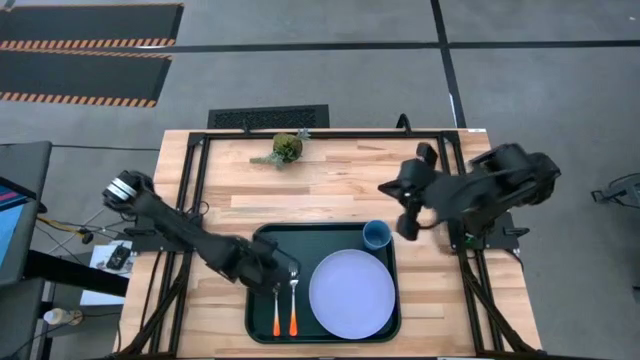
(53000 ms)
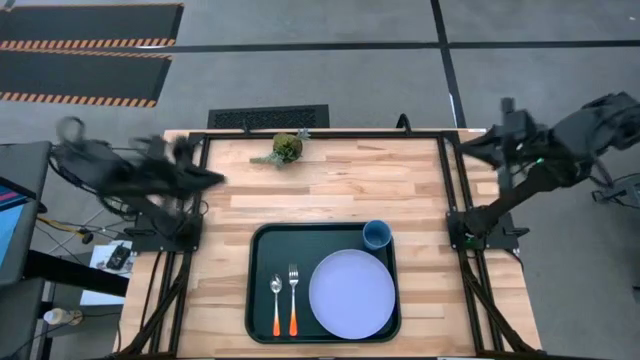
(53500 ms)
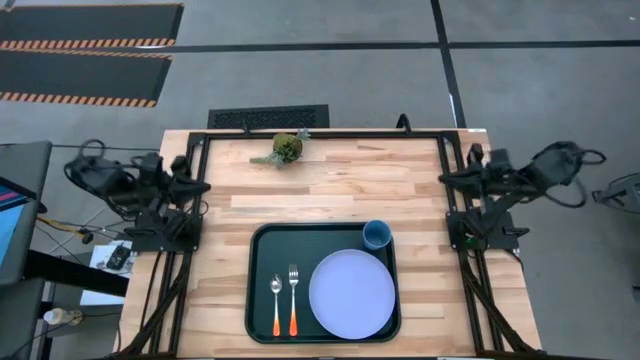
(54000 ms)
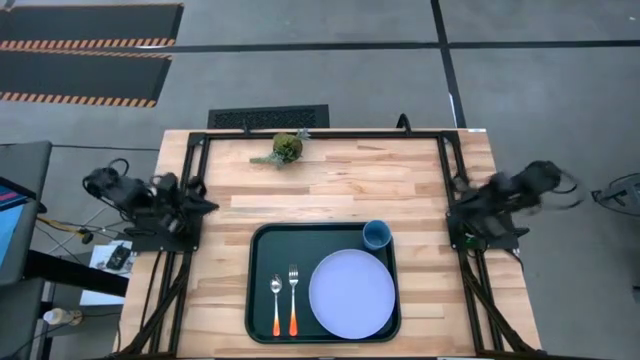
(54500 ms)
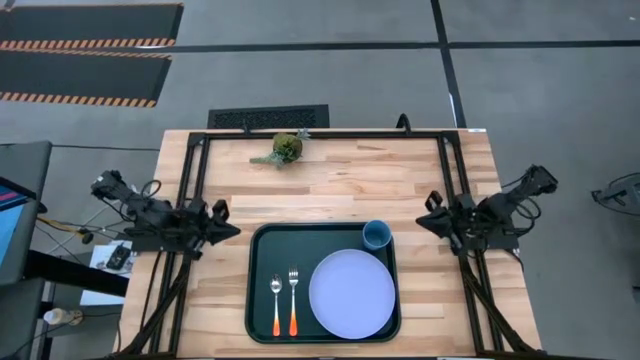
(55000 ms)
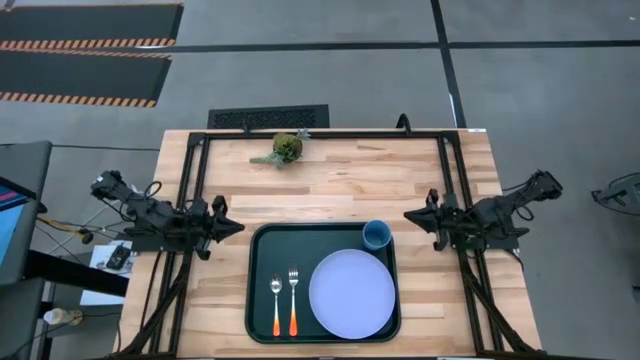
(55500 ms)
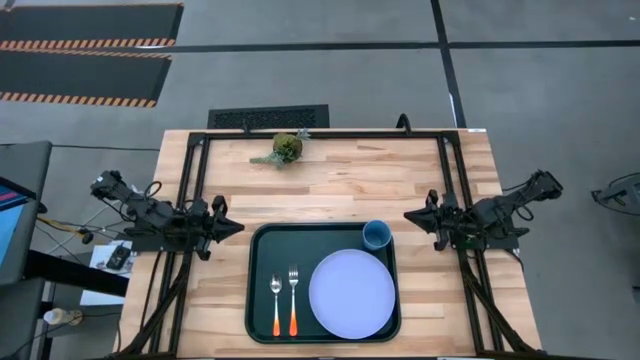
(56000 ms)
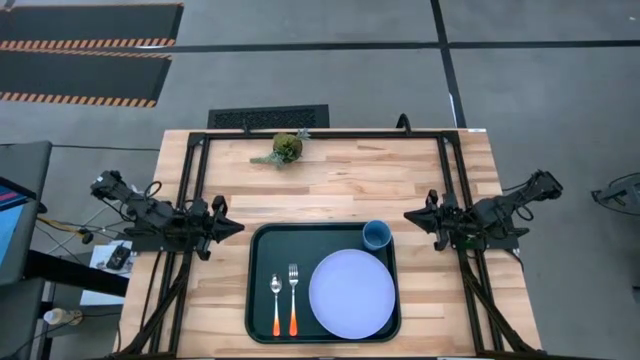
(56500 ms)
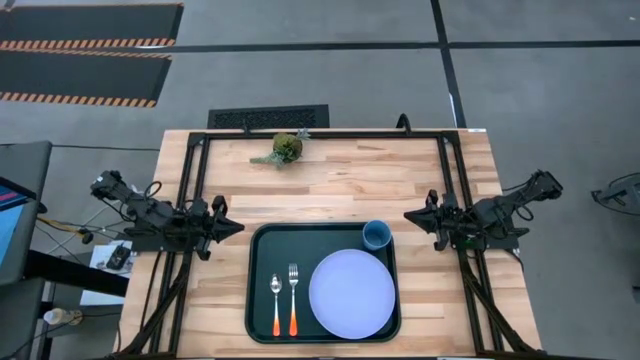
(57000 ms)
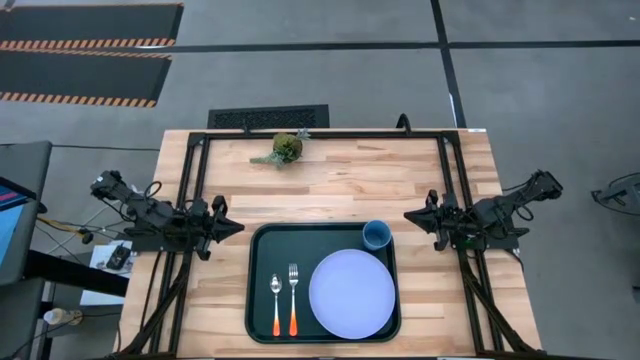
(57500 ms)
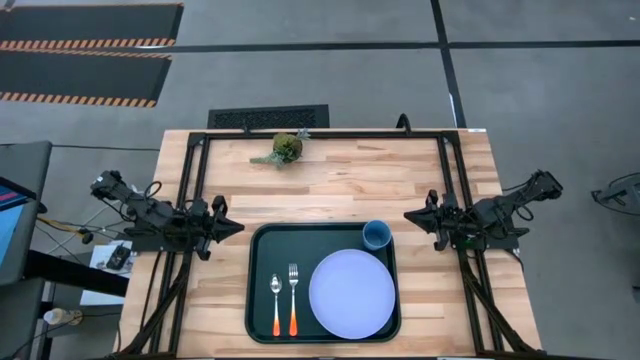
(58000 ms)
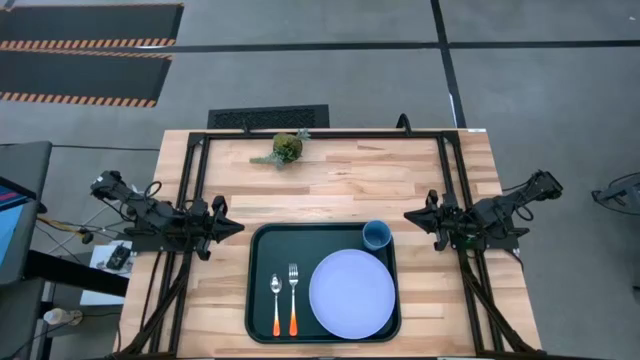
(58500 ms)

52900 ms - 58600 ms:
Task: Pick and place plate/cup/fork/spoon on tray
Return to Home Position

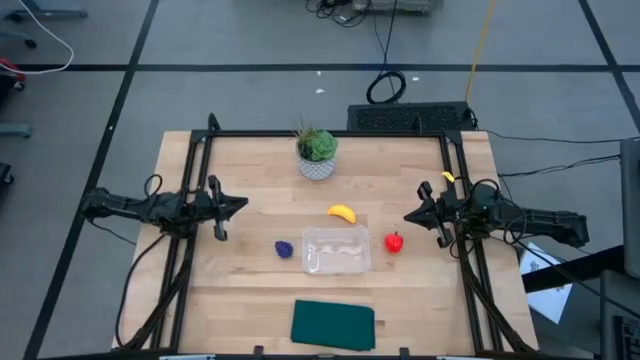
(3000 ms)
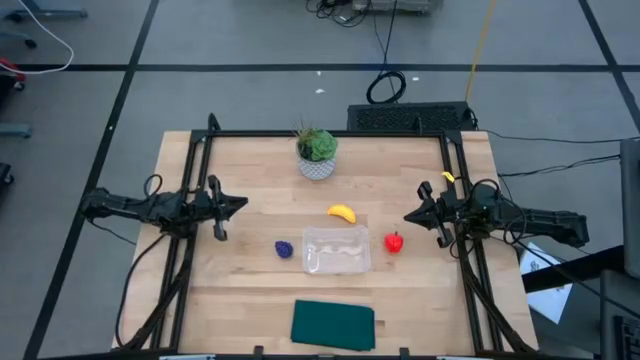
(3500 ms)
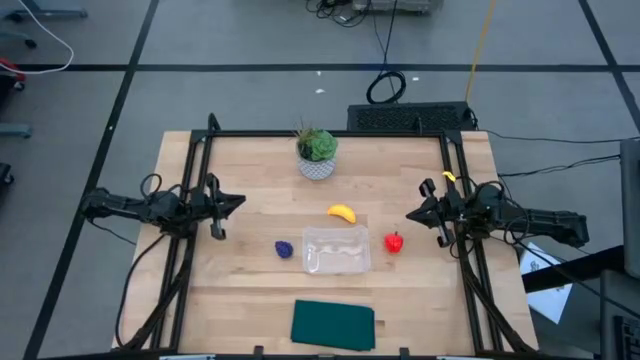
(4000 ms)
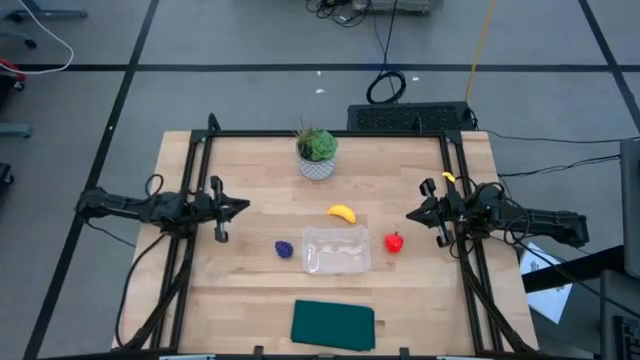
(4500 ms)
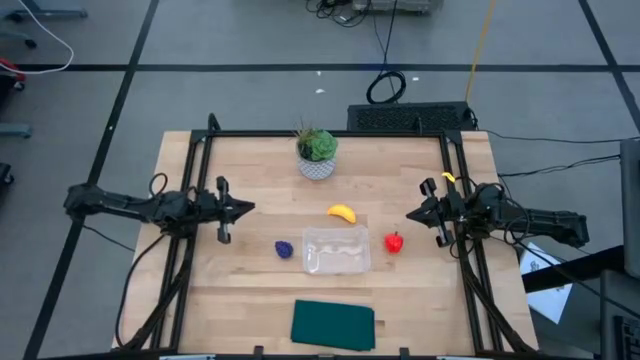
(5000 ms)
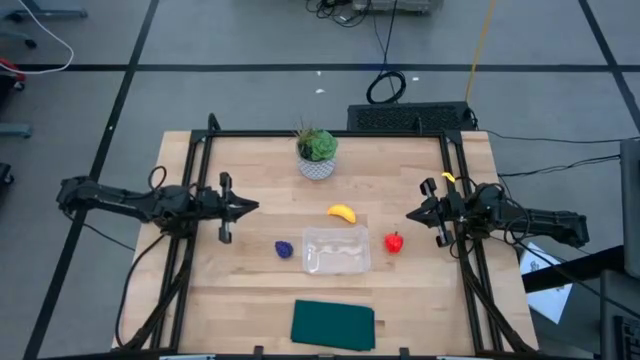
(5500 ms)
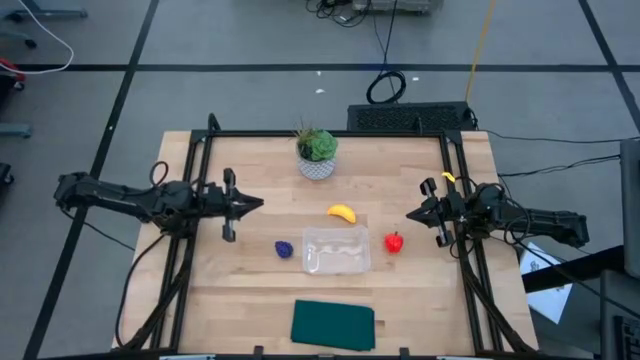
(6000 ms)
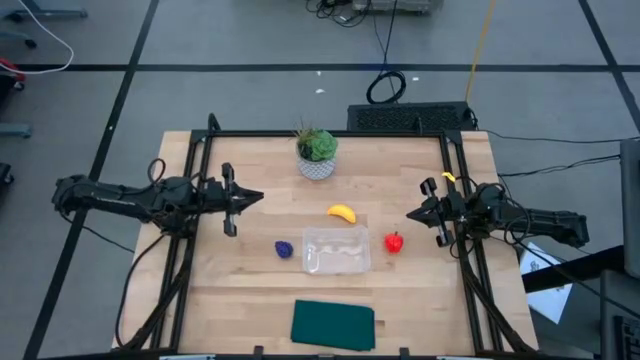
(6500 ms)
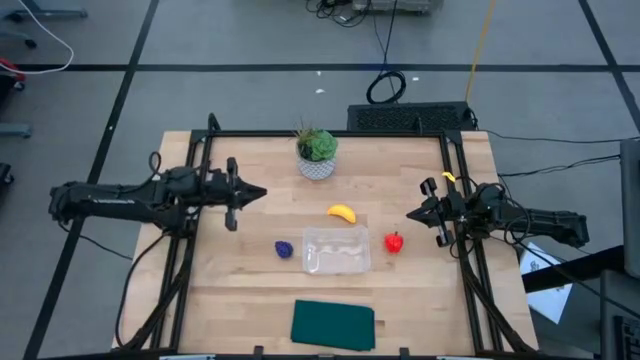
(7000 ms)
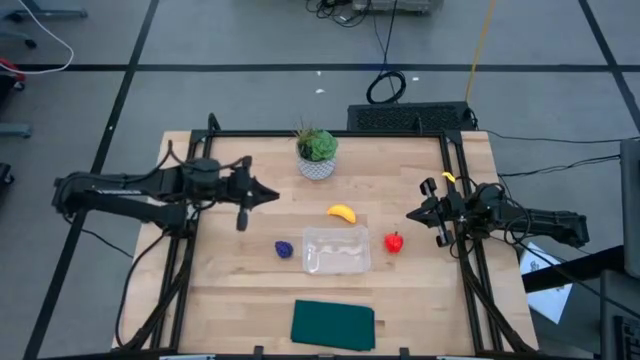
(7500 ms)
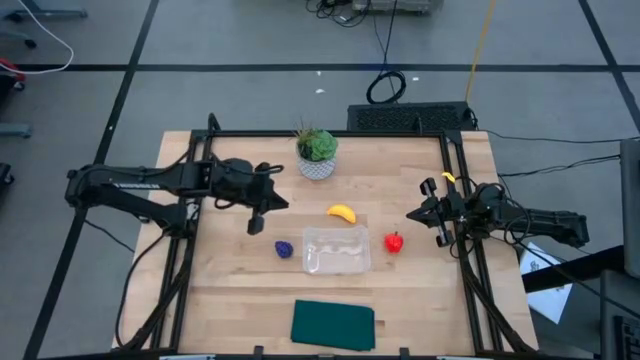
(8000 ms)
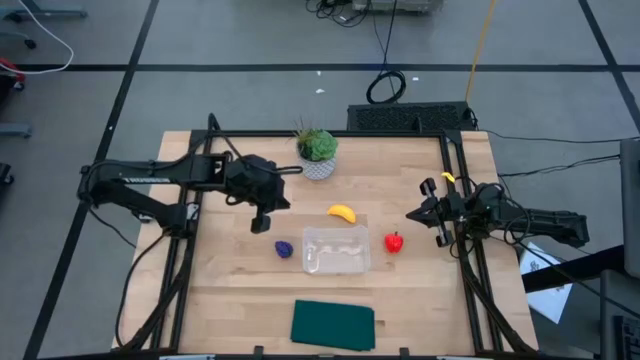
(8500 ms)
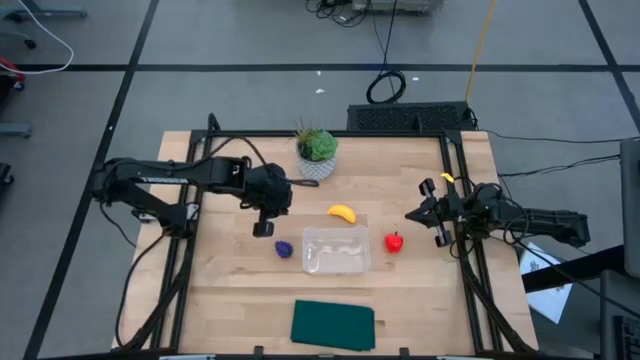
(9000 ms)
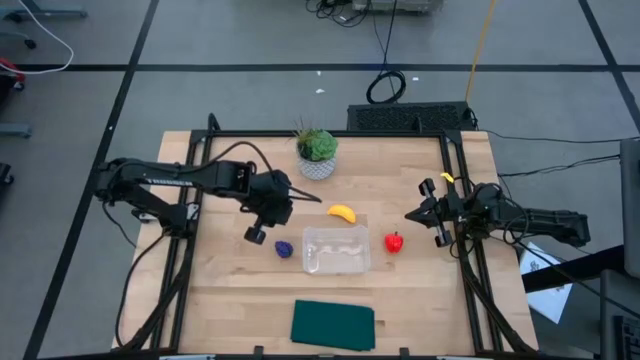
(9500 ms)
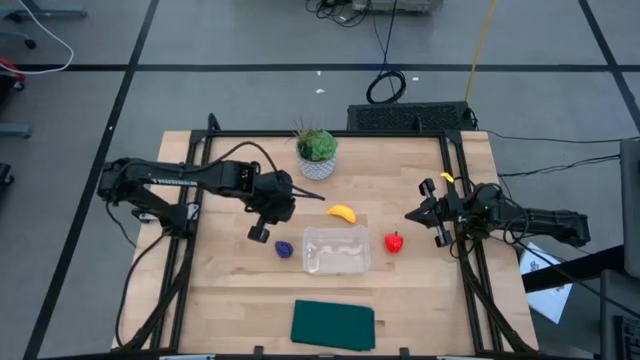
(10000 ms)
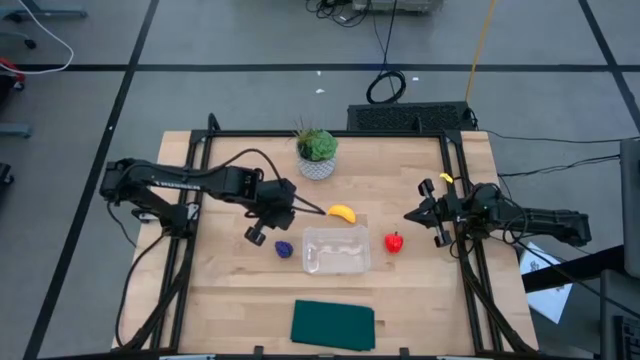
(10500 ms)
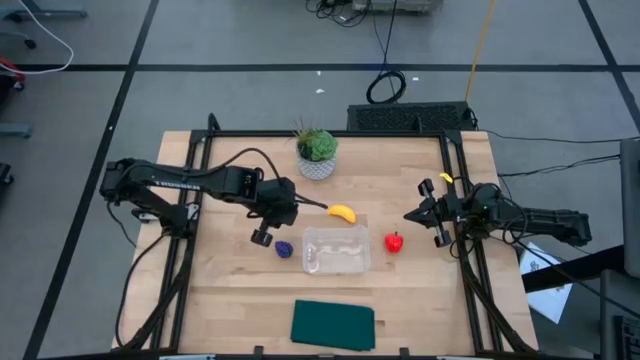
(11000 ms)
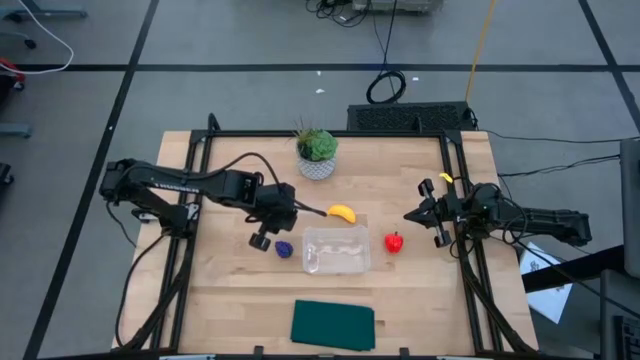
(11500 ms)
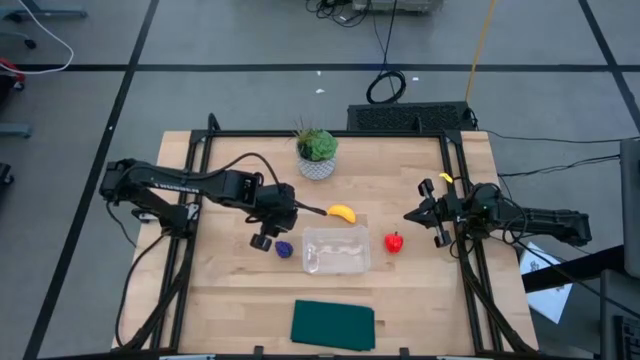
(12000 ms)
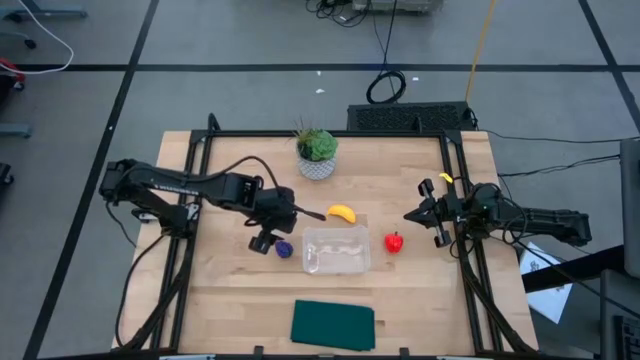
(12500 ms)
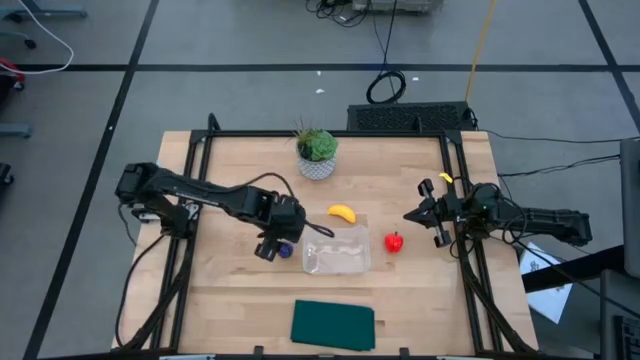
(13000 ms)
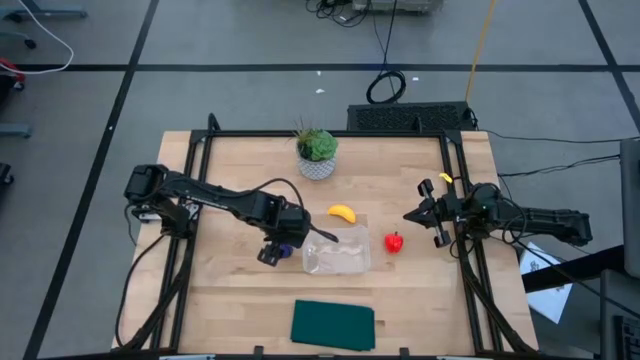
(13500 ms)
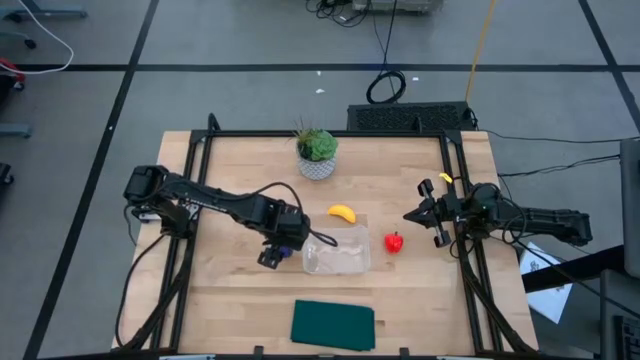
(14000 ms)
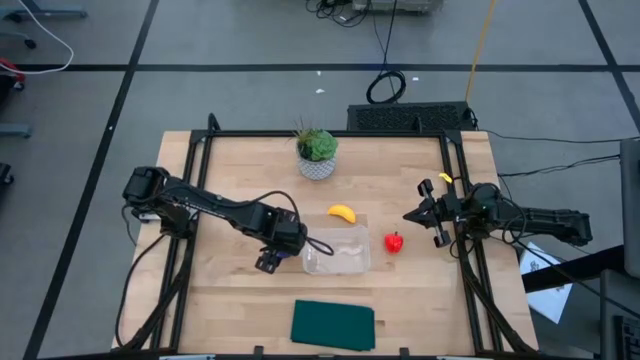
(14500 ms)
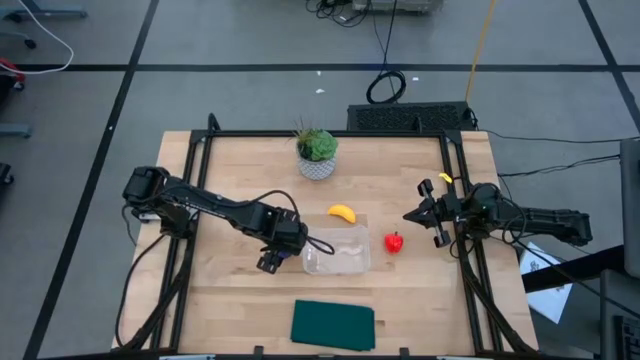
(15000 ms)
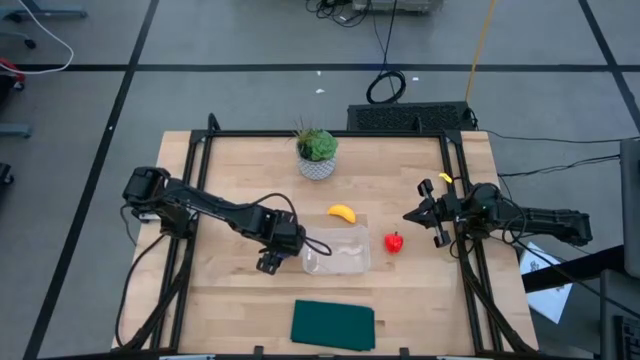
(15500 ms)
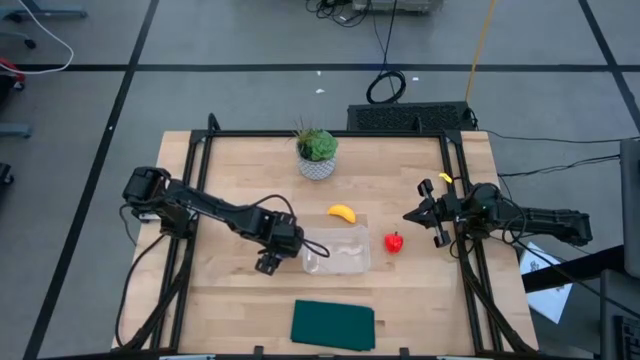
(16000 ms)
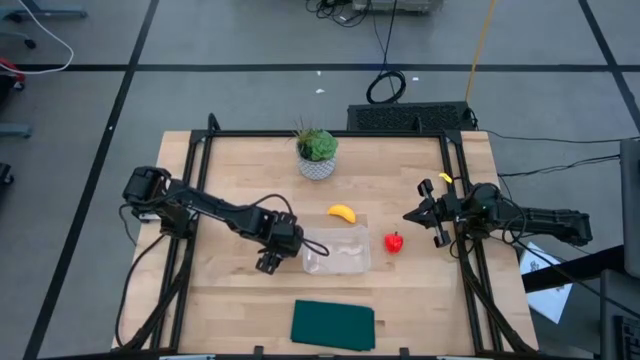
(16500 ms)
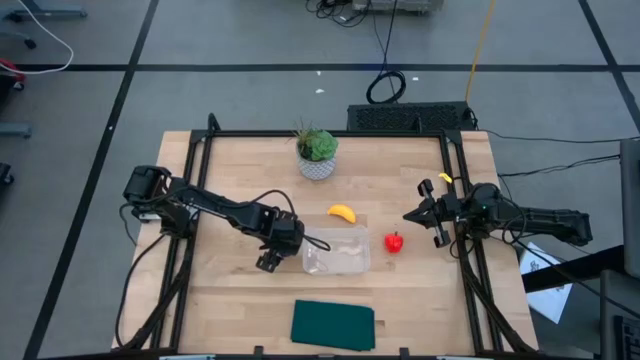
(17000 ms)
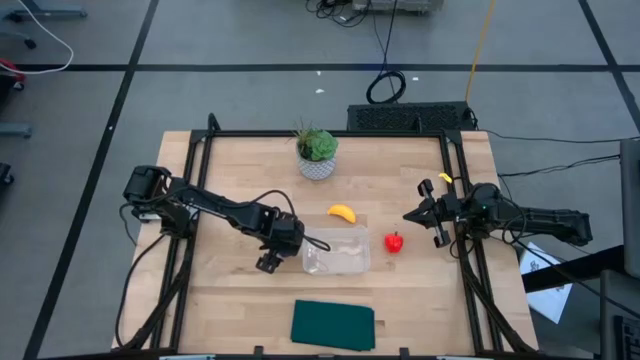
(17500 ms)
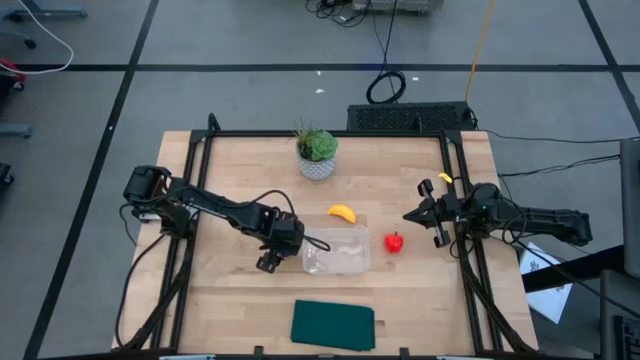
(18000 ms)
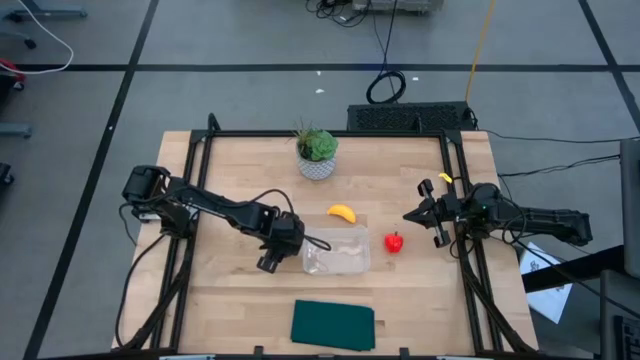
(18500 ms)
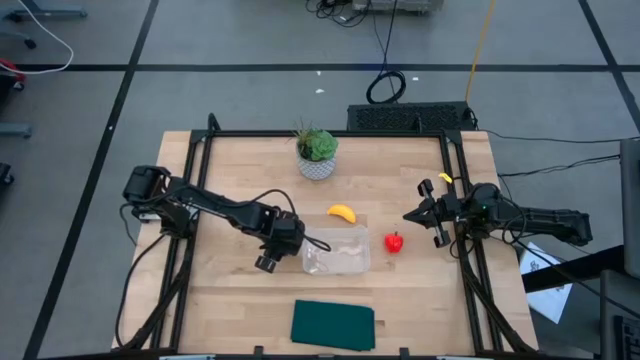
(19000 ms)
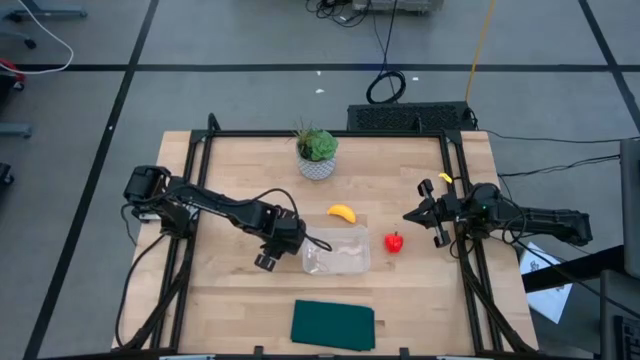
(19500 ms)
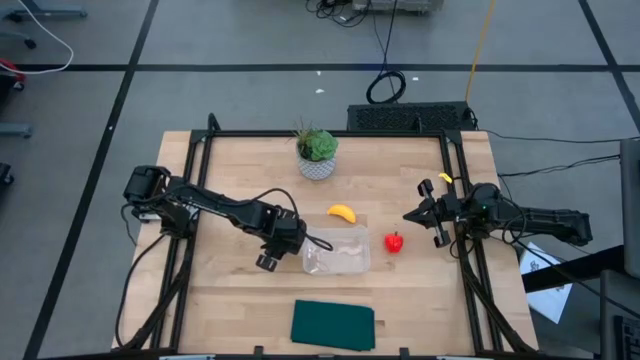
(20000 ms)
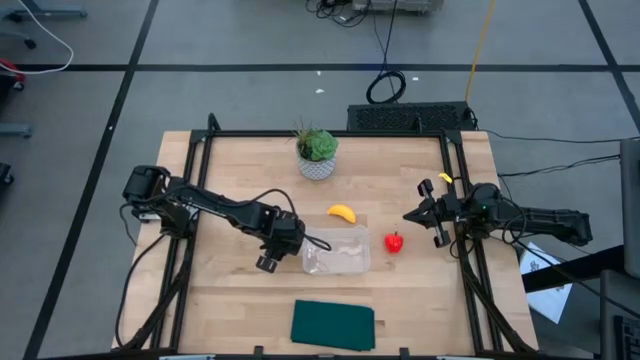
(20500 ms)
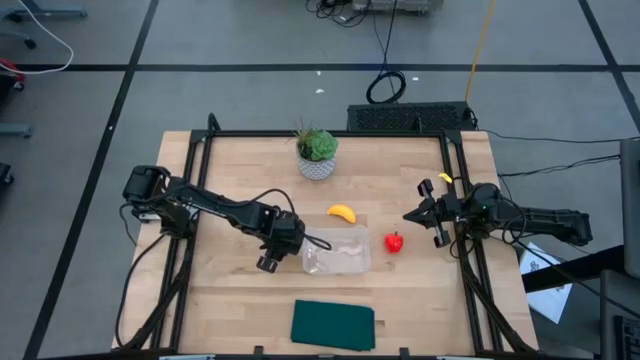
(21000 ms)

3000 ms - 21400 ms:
Task: Pick and placing Produce into tupperware
Put the grapes into the transparent bin
